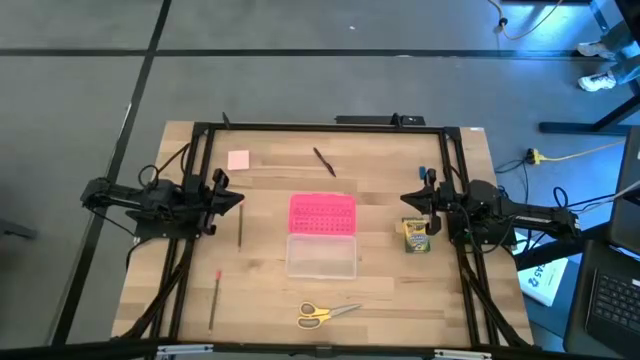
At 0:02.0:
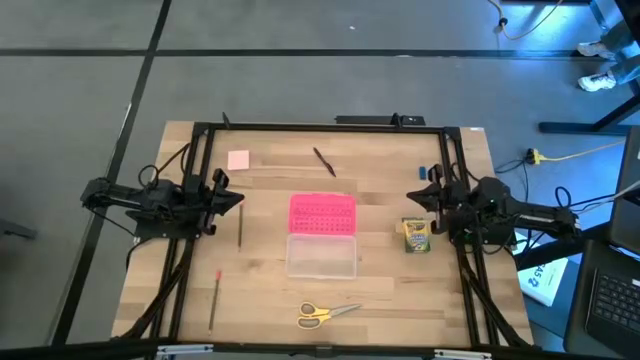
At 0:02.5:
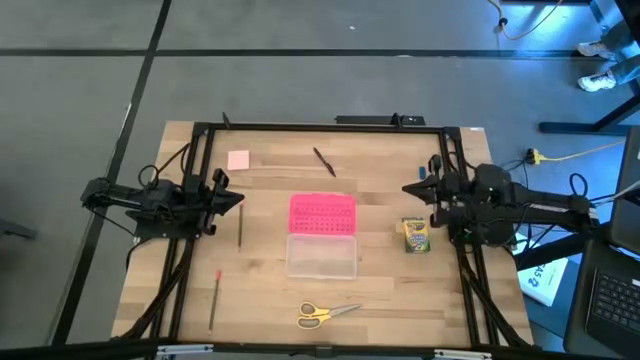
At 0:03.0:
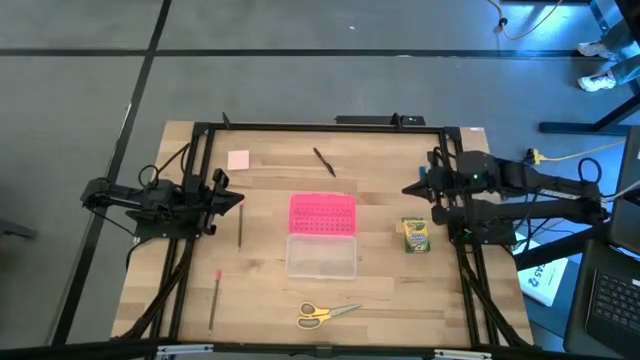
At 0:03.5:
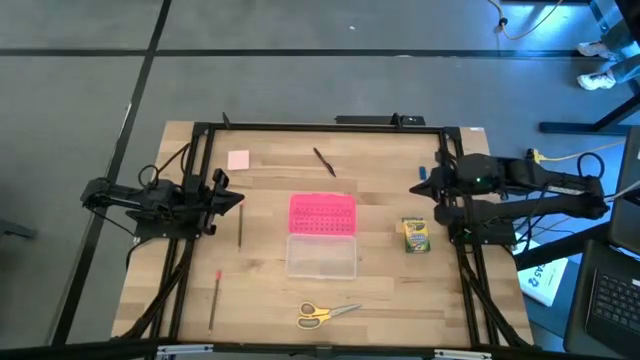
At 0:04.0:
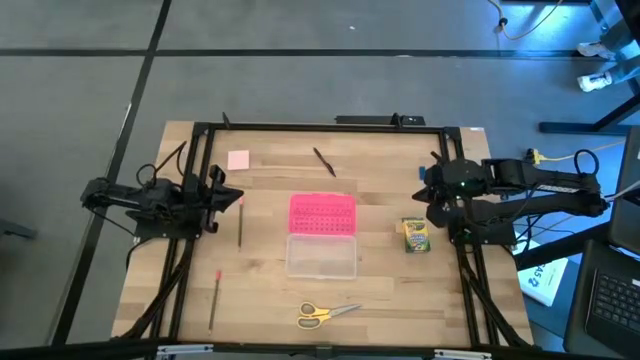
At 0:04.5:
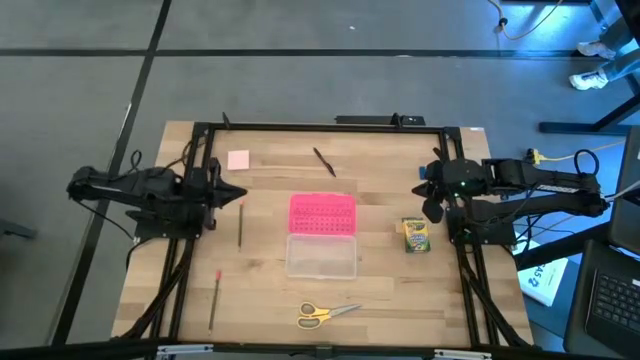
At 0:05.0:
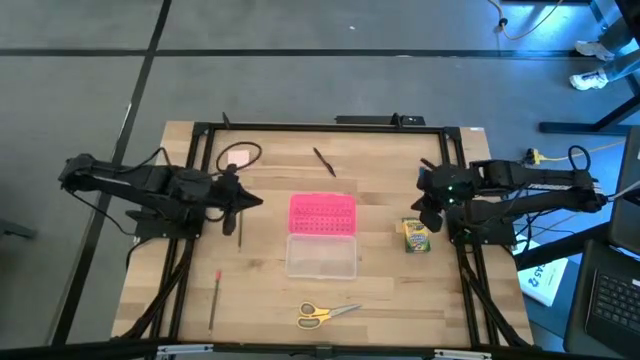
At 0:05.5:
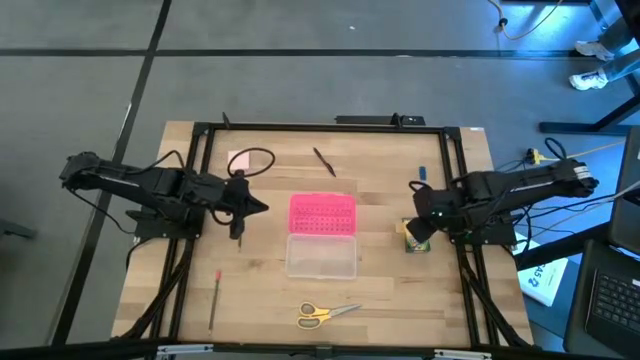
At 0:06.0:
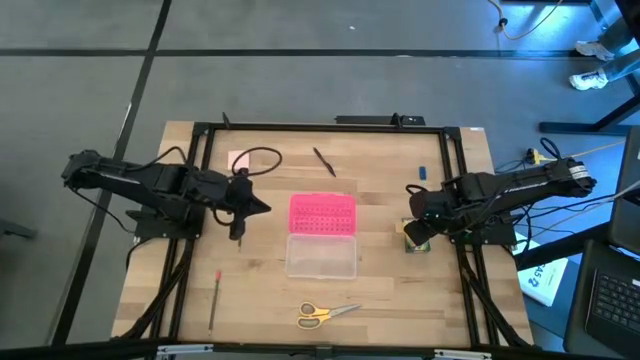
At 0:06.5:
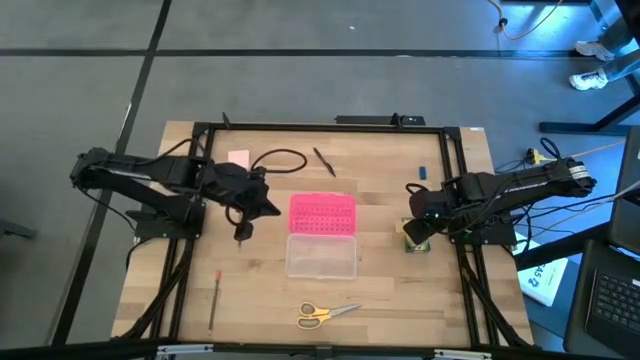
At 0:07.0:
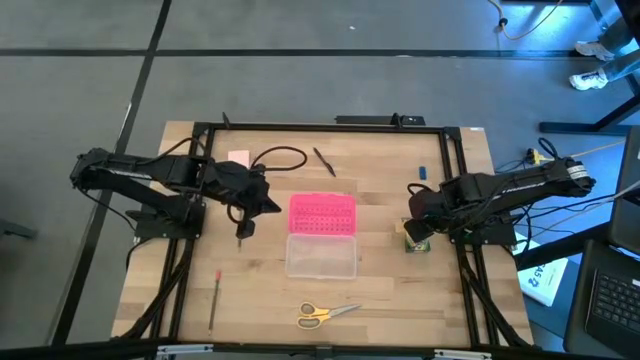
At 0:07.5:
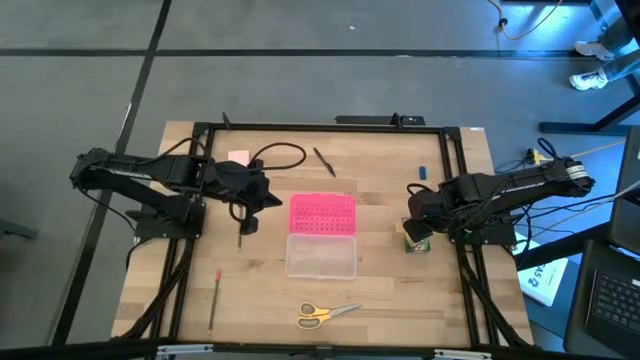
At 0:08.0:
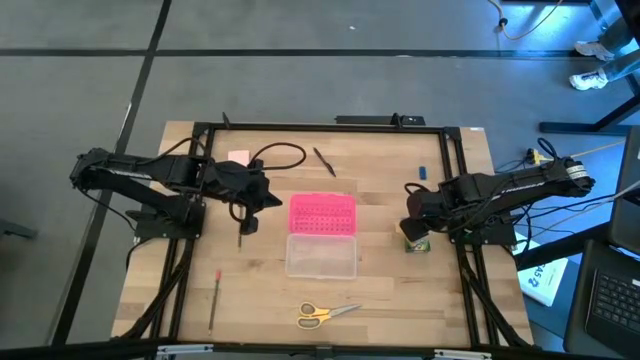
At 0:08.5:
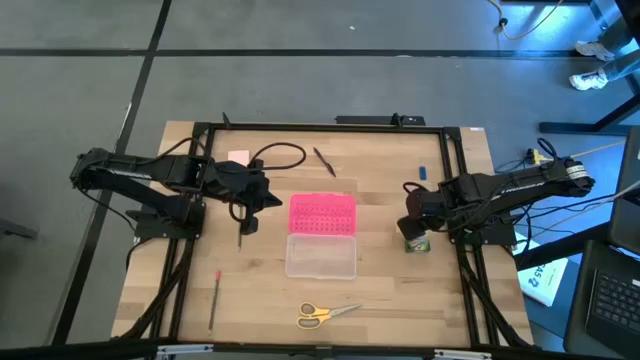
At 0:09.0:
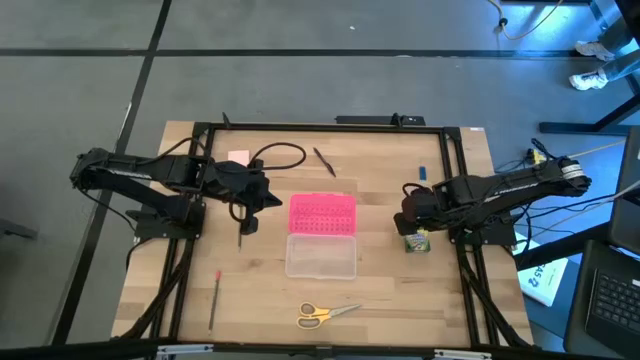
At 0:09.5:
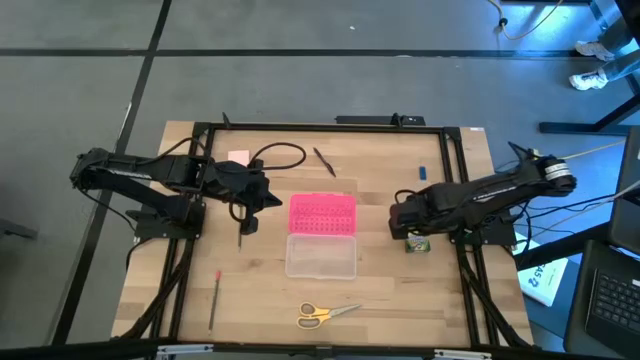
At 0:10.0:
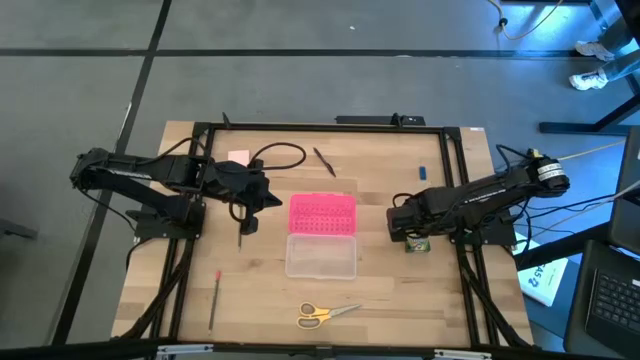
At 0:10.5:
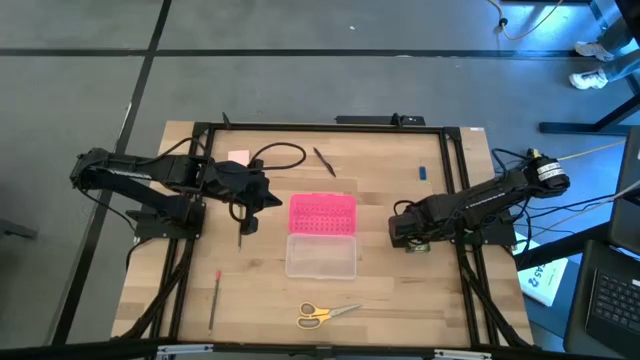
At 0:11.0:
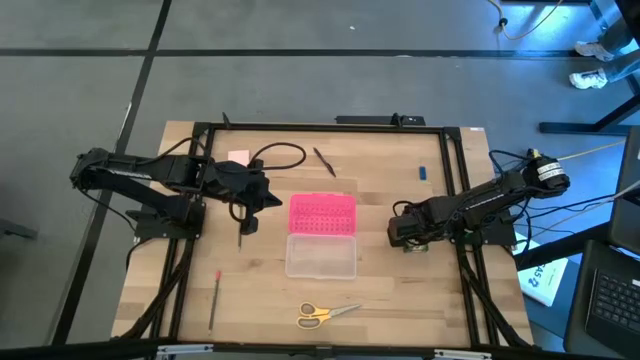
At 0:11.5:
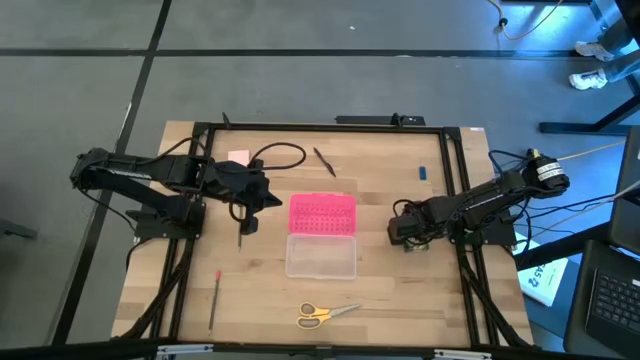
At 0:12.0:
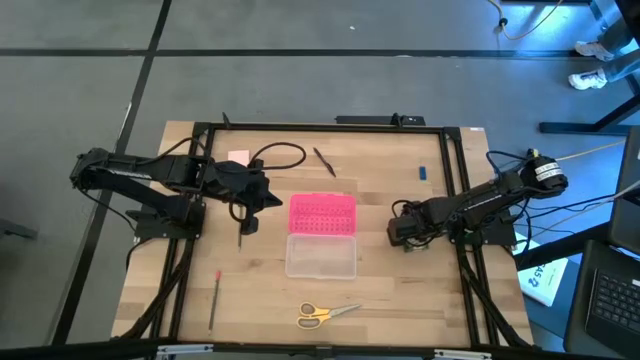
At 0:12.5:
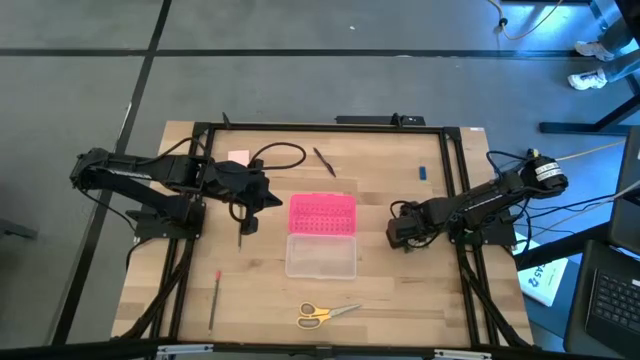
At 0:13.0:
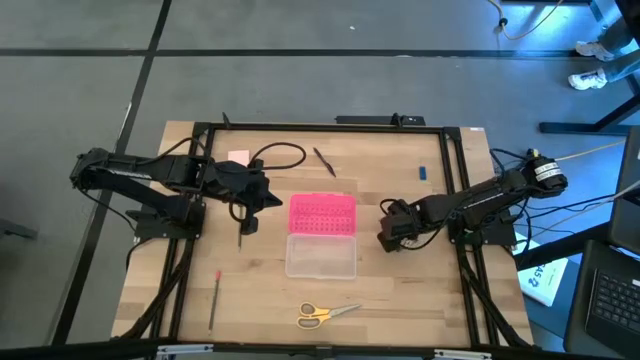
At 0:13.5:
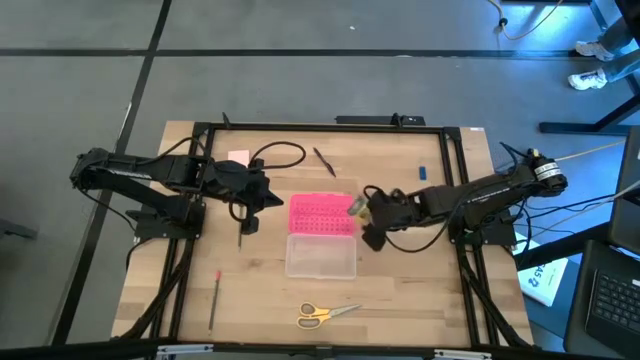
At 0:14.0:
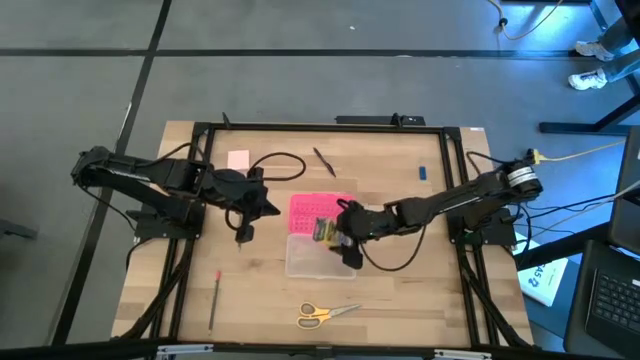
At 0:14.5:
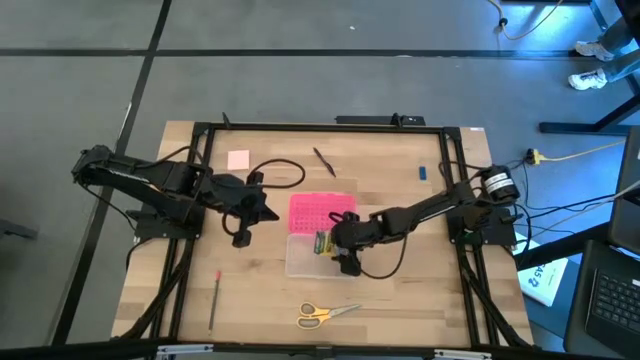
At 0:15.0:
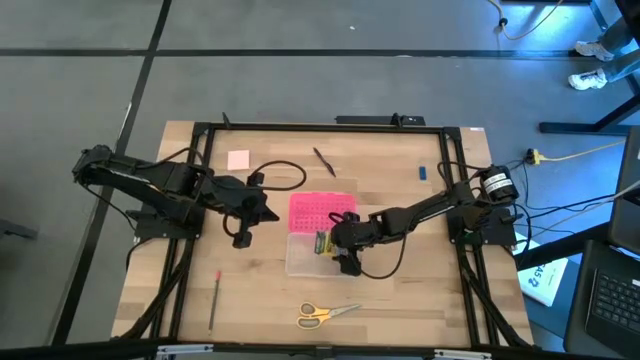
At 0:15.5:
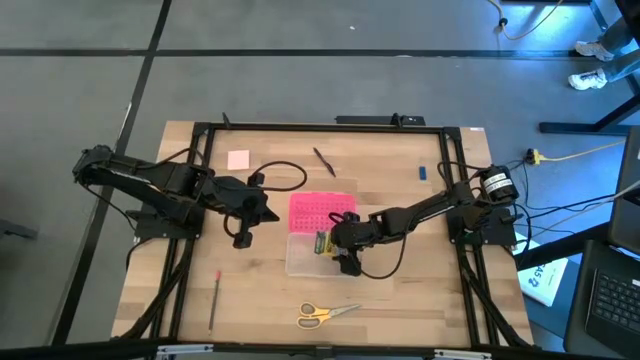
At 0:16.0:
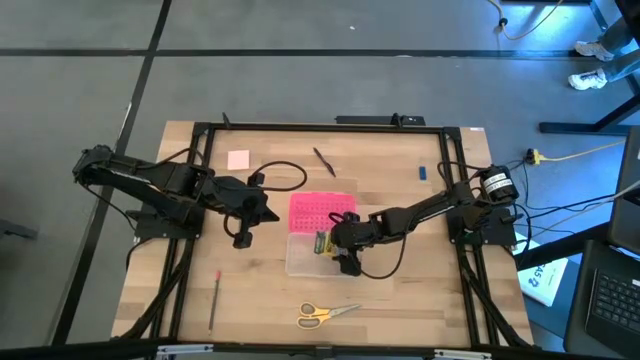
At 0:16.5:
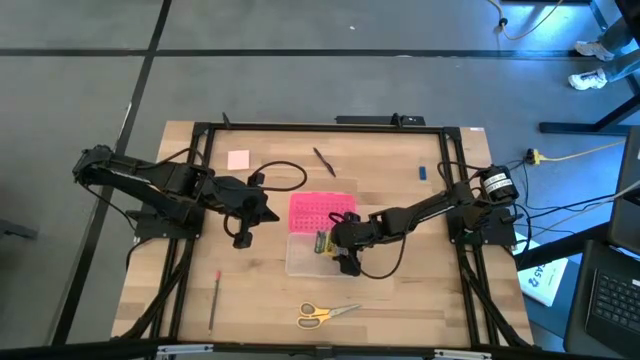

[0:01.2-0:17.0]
Task: Pack school essentials
Put the yellow crayon box into the pink supply box

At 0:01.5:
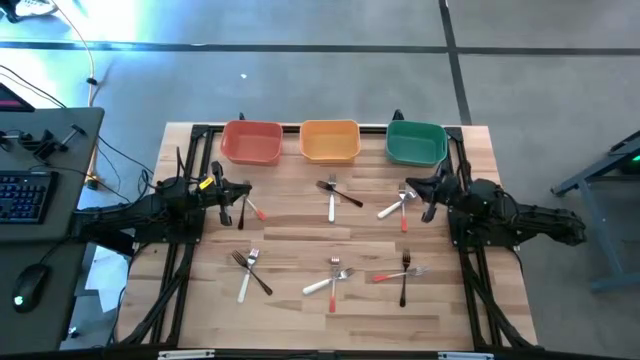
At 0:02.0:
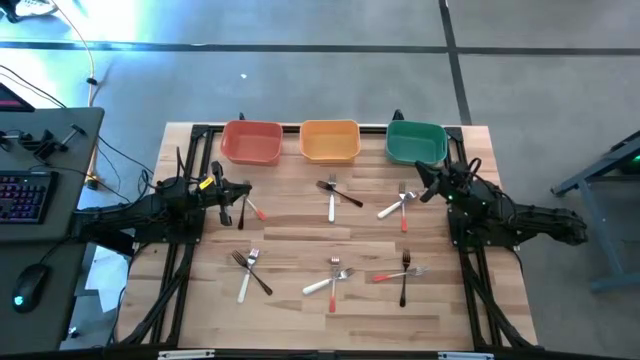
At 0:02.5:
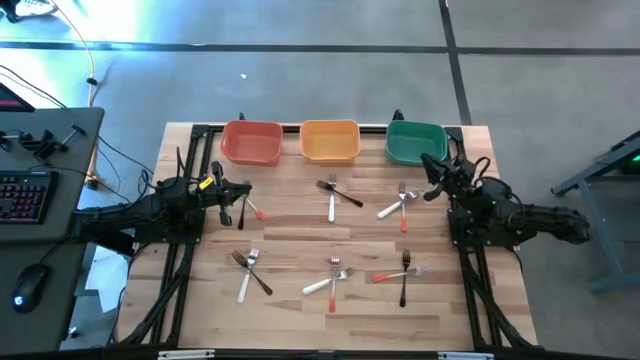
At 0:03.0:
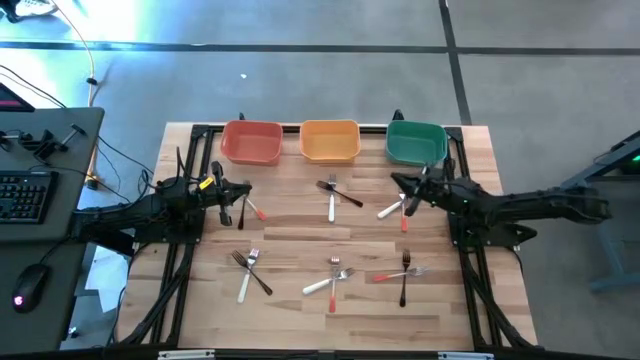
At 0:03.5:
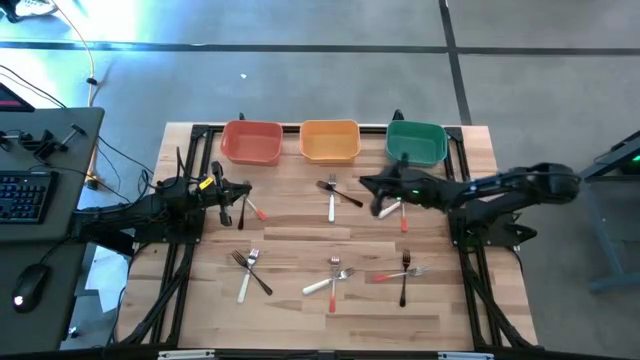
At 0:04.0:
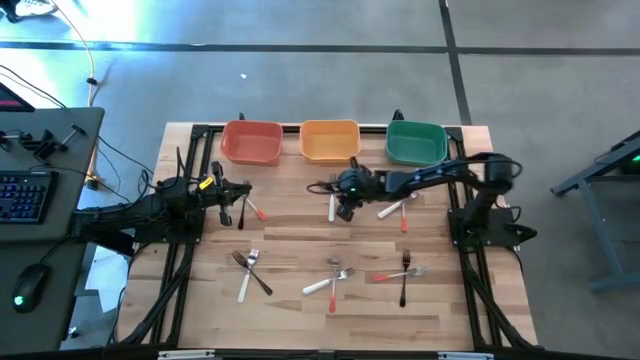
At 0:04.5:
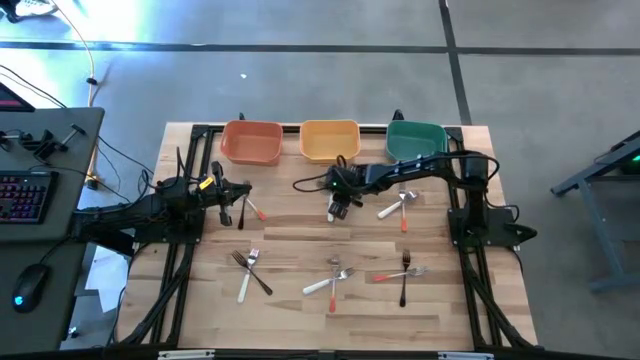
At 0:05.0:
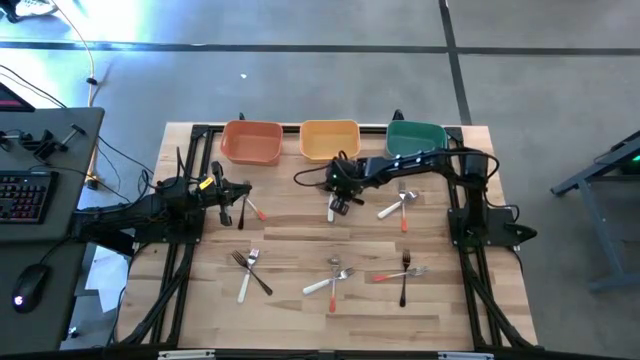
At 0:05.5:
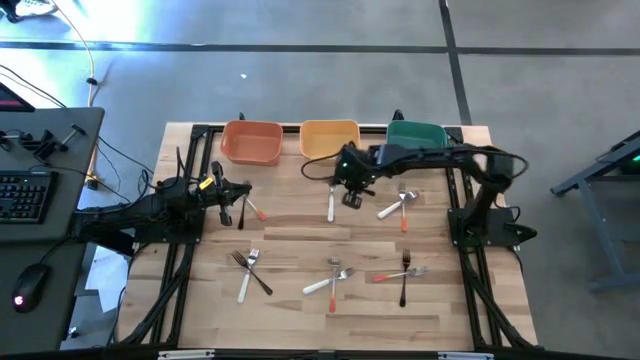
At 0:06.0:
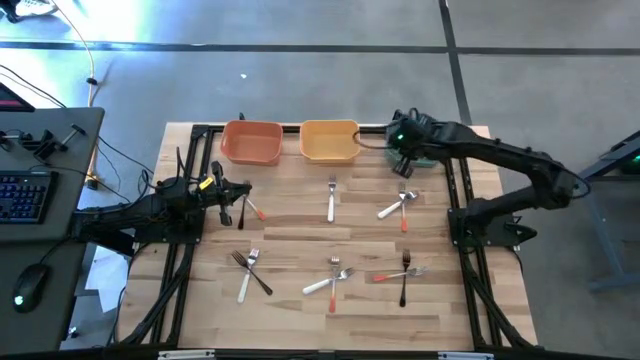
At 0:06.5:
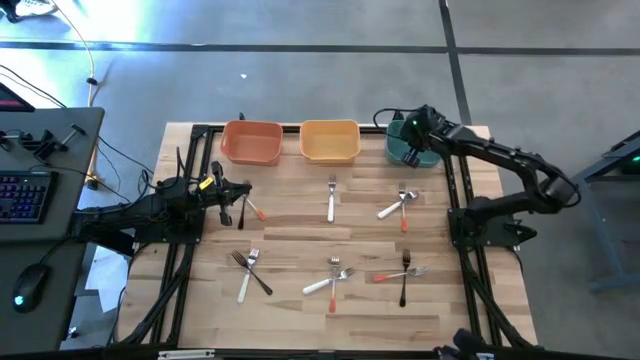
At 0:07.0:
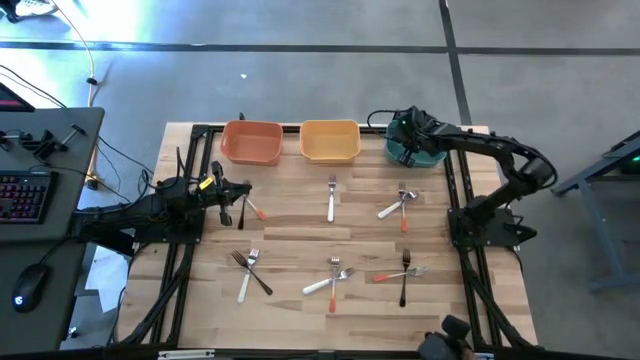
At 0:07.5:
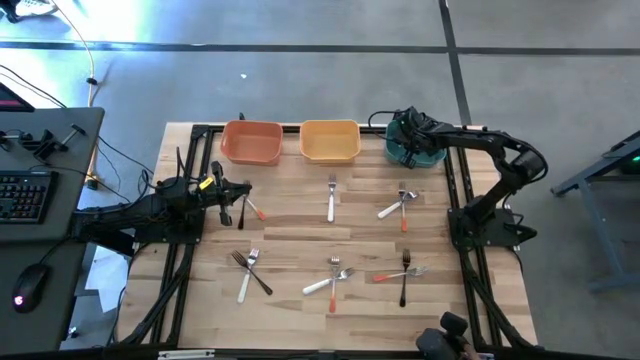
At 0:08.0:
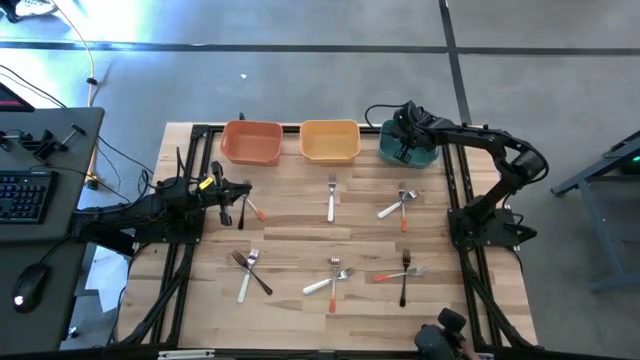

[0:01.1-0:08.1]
Task: Sort silverware by color (type)
Put the black fork into the green bin
